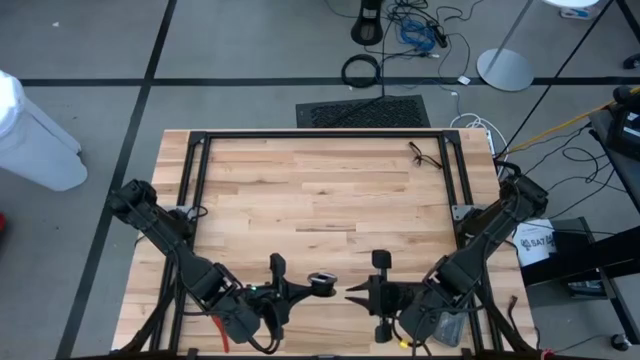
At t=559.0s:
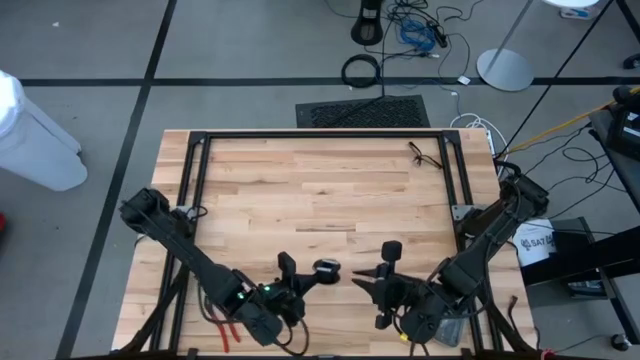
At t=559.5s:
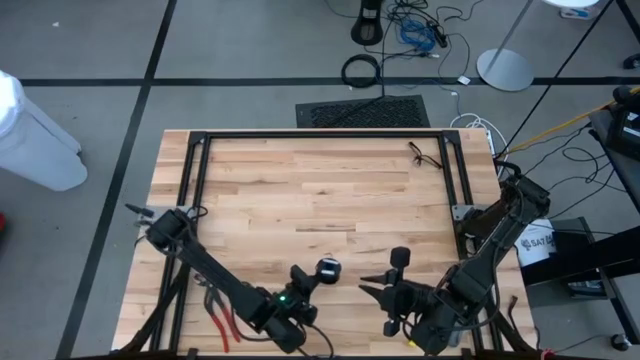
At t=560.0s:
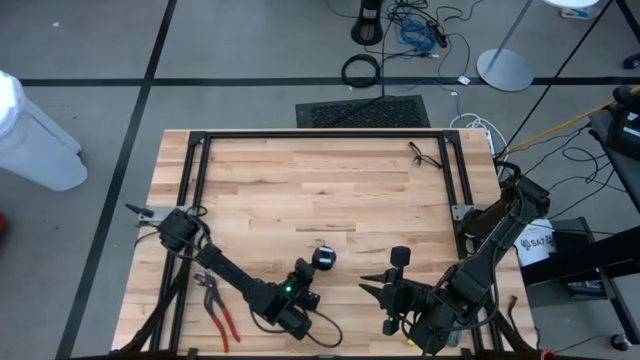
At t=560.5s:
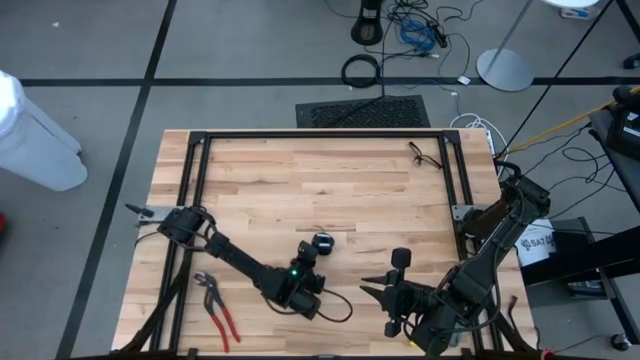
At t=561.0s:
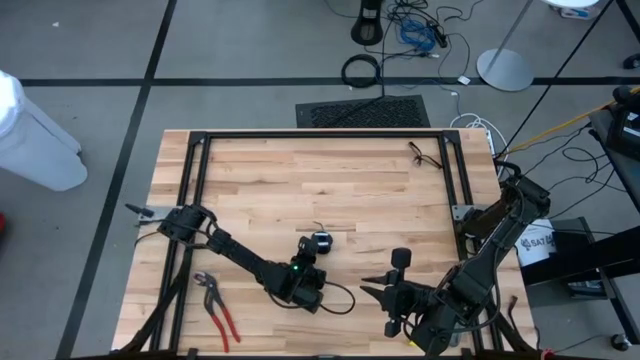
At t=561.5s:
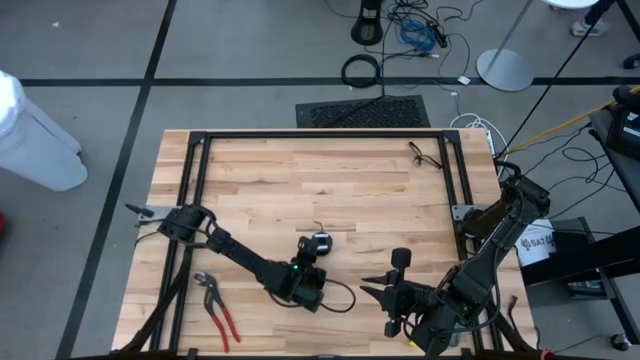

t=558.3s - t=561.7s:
Task: Coil cords
Put the black spool on the table

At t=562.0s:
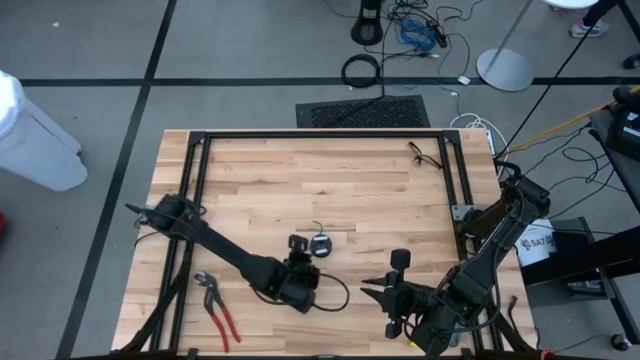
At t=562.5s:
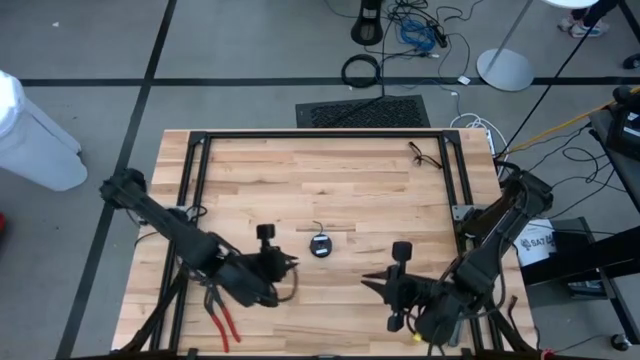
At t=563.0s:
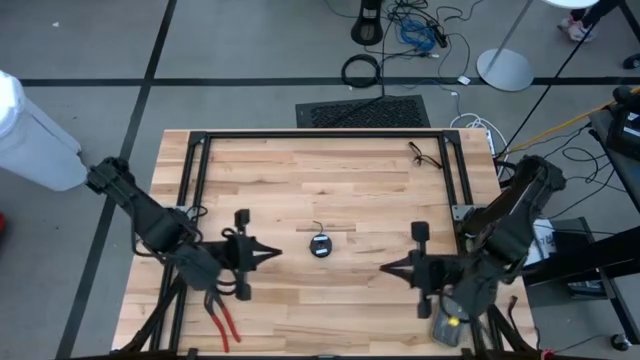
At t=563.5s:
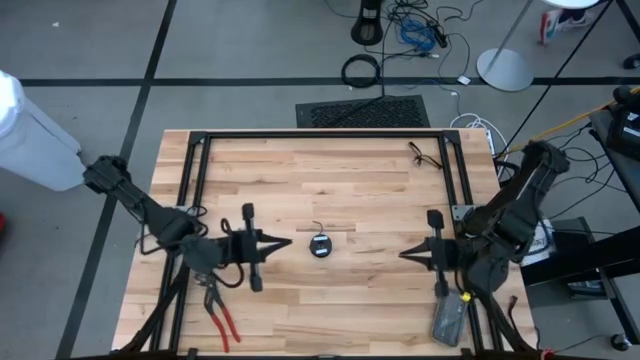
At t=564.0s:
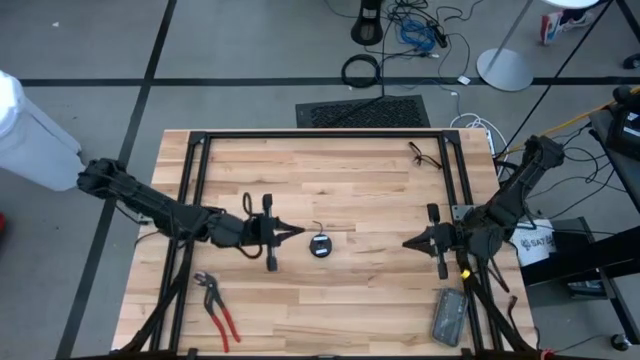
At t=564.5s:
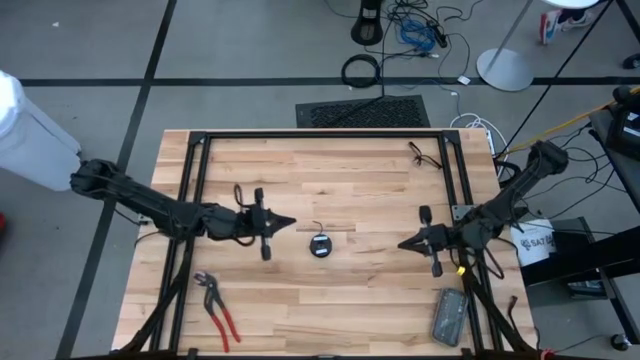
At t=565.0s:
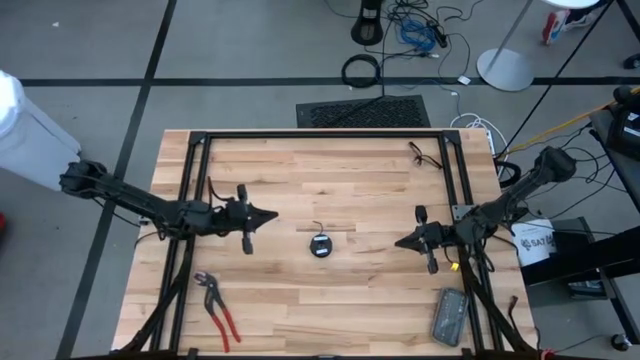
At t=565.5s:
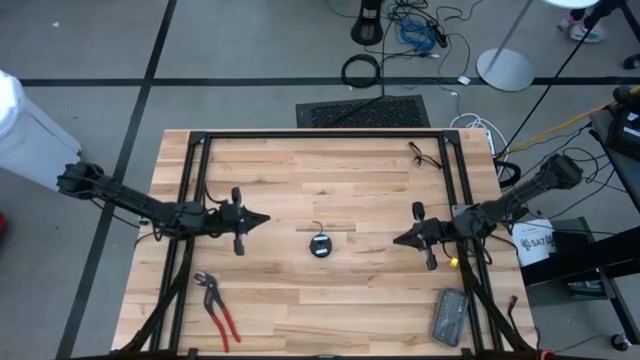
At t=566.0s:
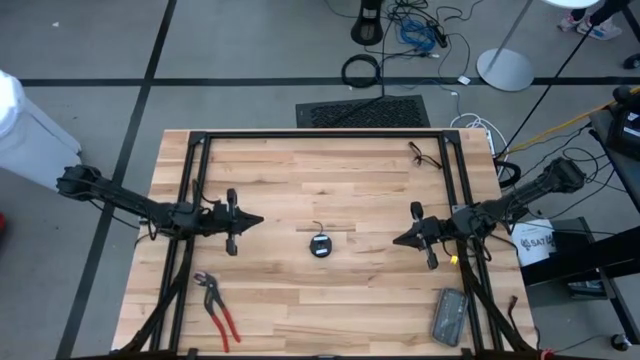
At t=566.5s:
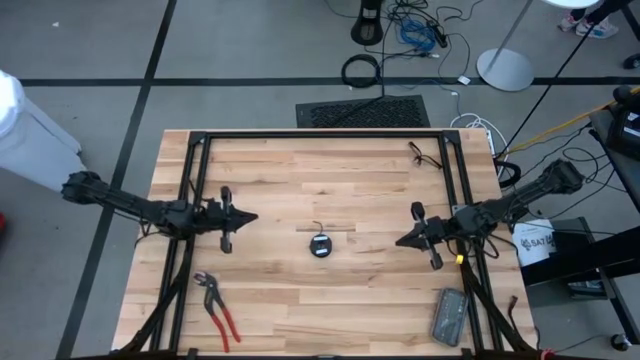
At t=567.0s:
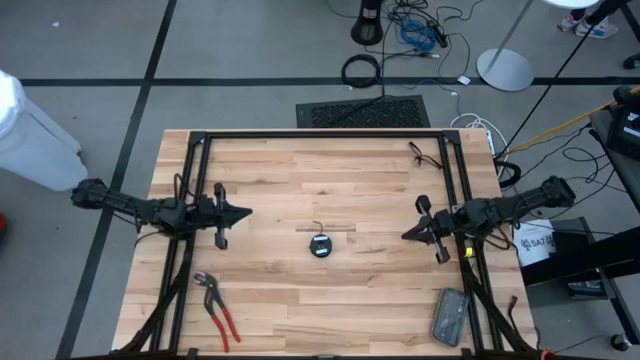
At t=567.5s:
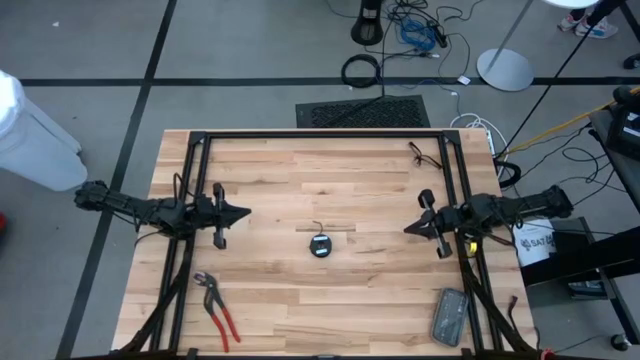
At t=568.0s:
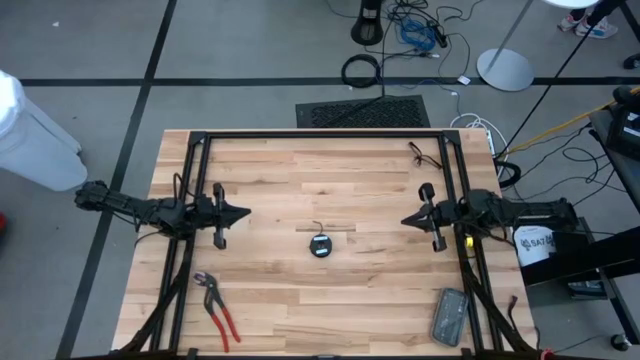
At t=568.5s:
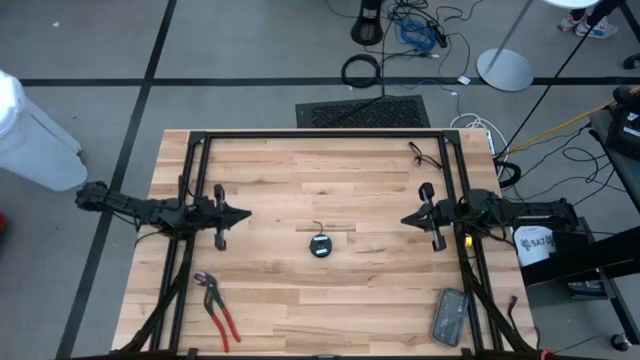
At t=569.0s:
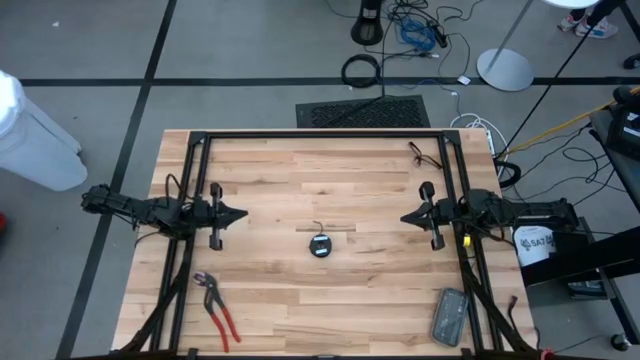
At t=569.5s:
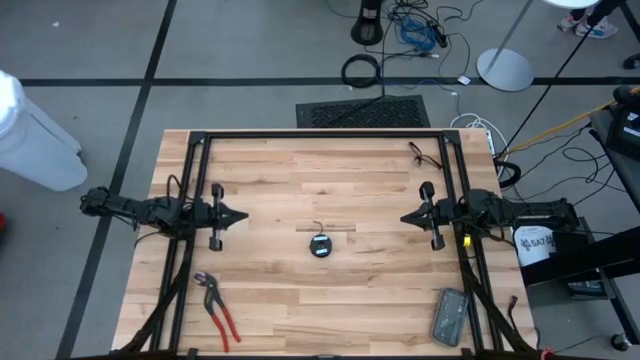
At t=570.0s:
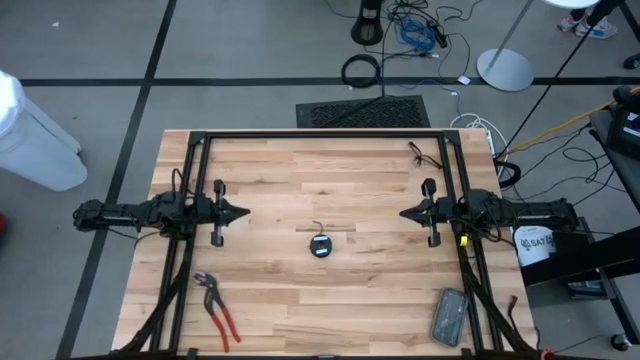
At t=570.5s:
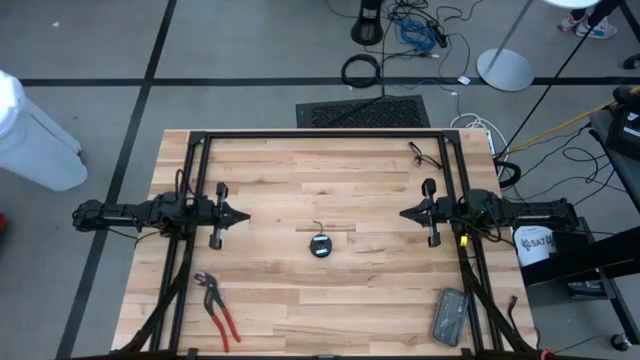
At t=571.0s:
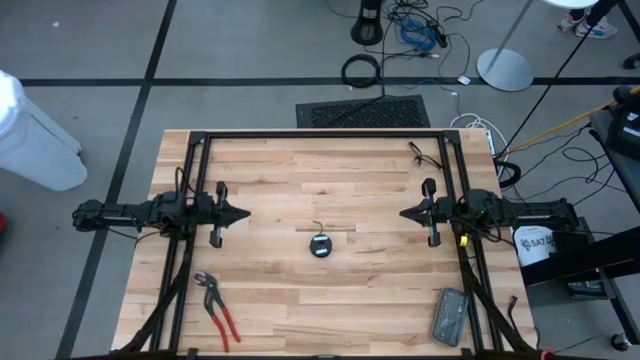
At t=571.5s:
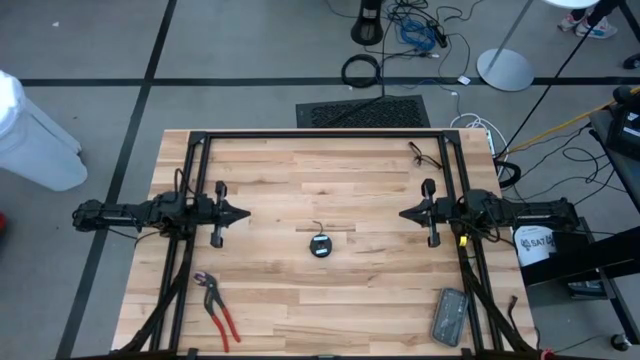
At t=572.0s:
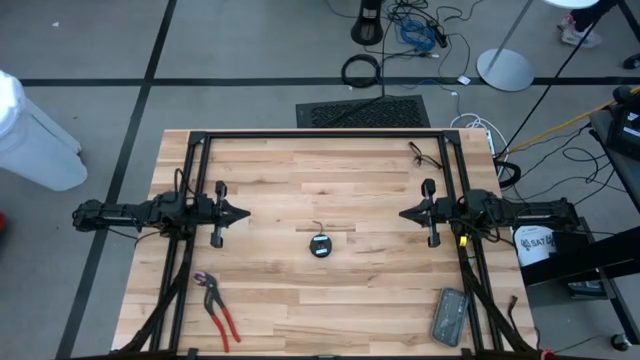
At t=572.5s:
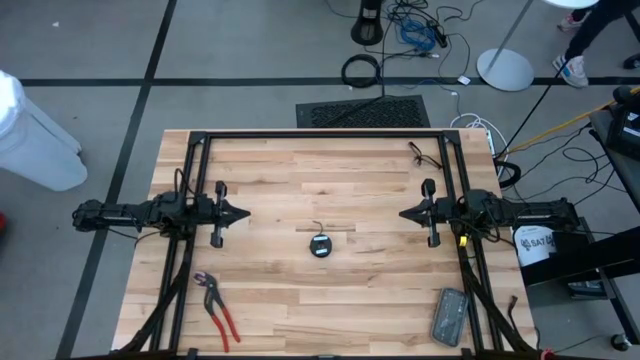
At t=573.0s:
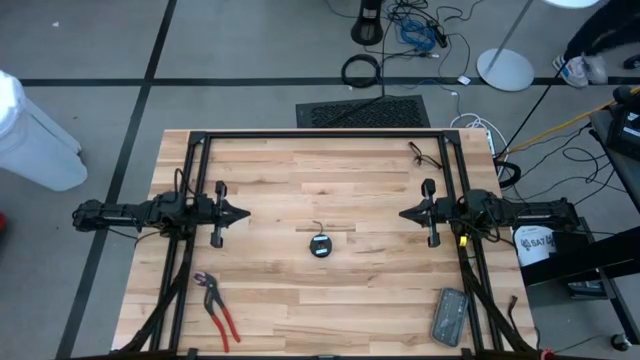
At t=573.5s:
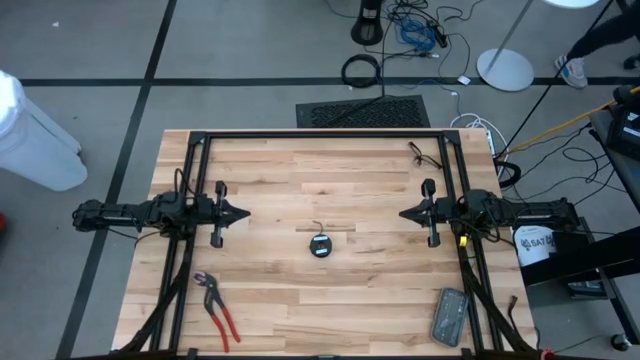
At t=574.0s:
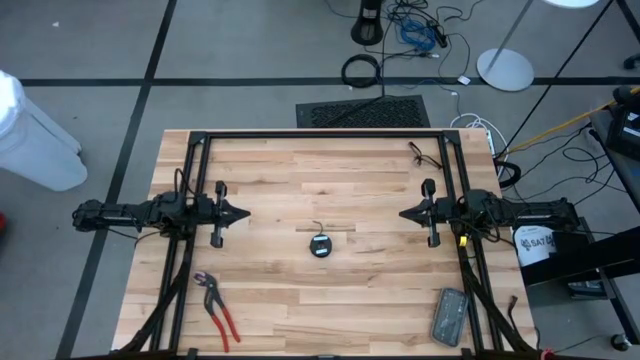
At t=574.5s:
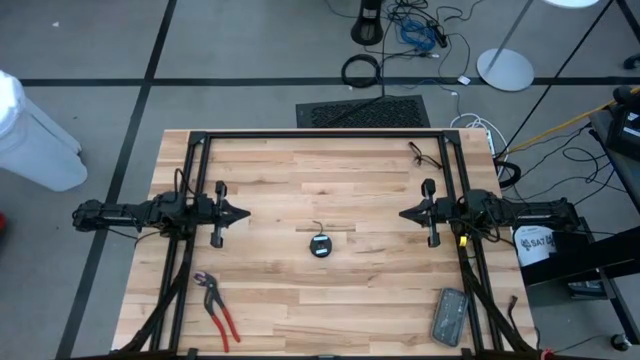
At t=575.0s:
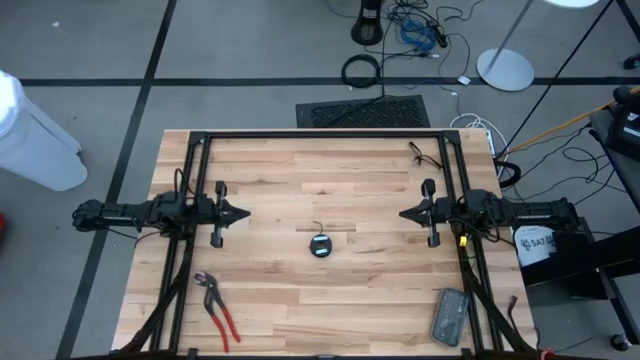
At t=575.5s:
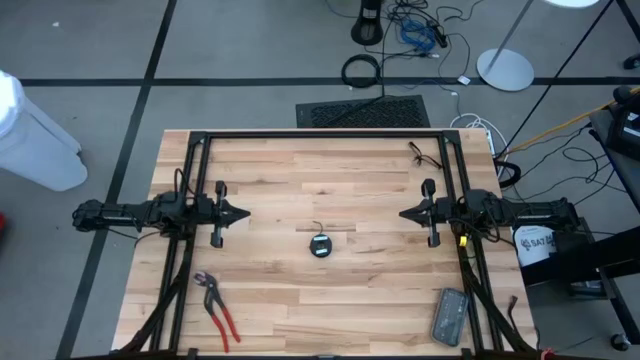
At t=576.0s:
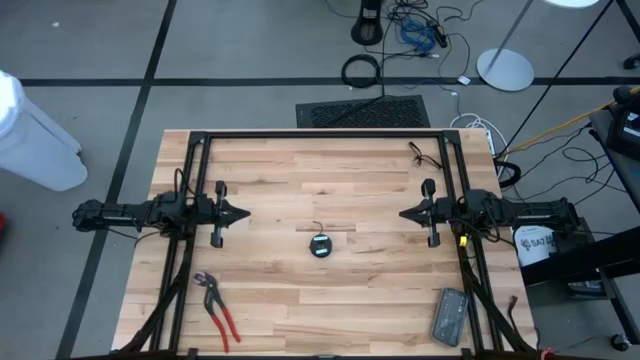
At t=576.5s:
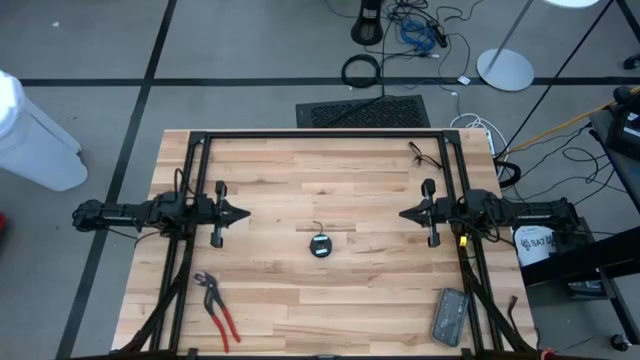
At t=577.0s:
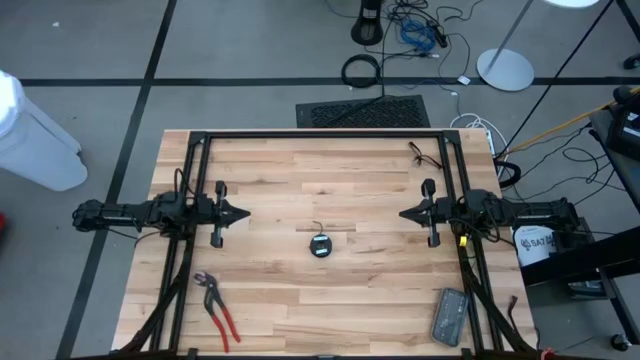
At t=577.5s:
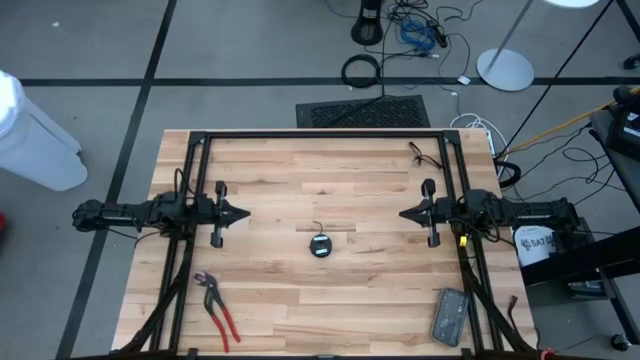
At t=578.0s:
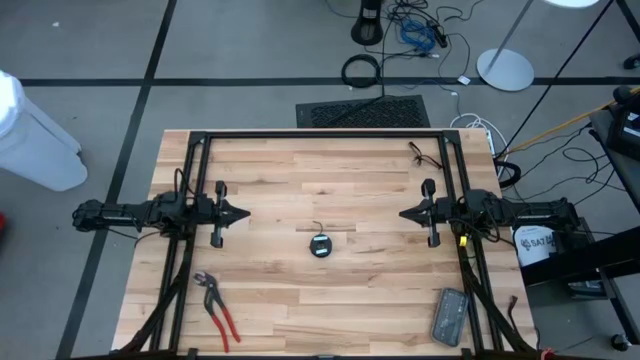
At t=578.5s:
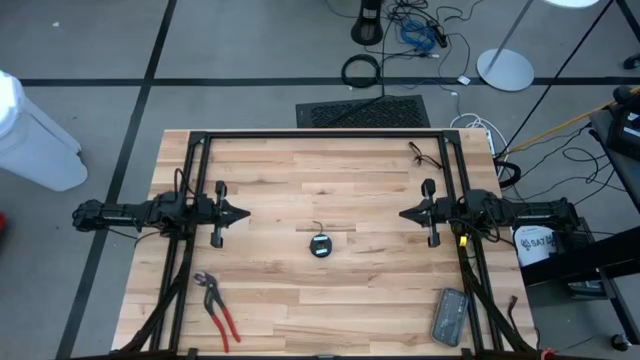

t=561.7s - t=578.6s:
Return to Home Position

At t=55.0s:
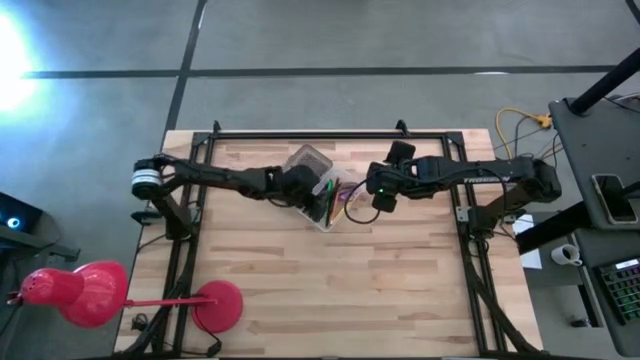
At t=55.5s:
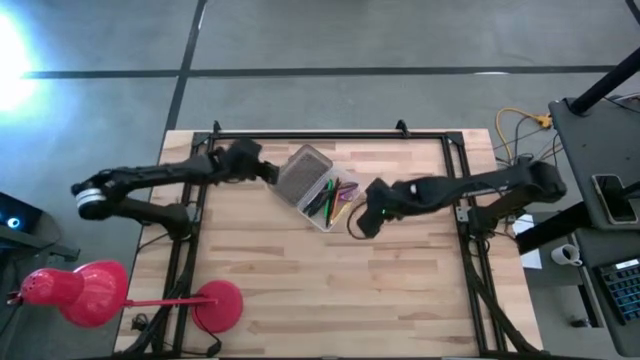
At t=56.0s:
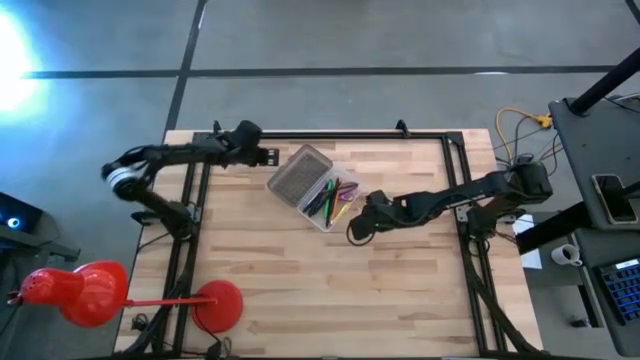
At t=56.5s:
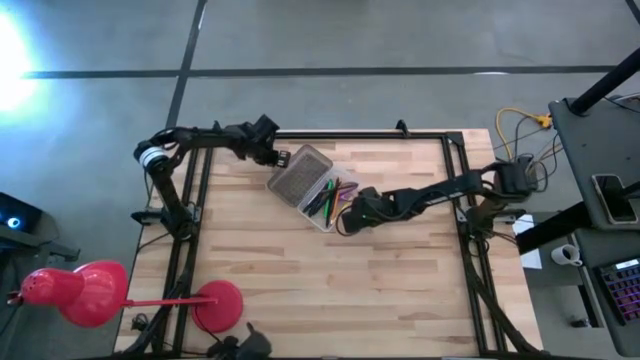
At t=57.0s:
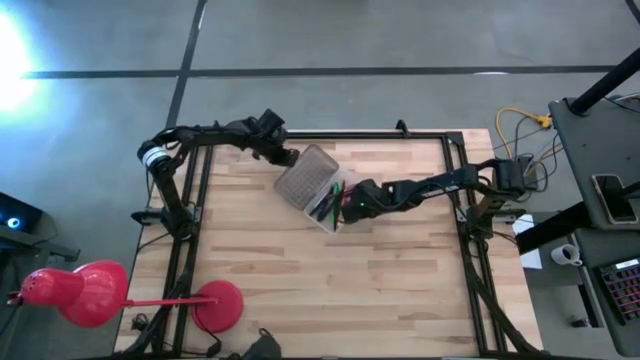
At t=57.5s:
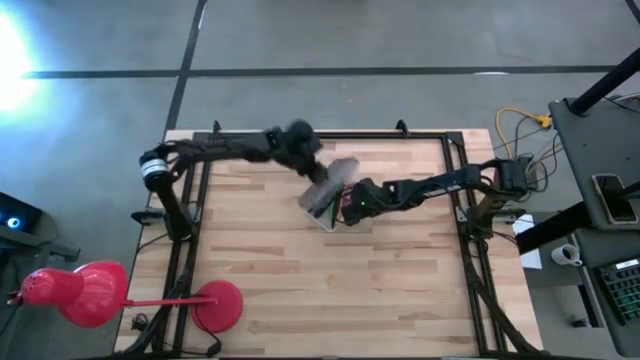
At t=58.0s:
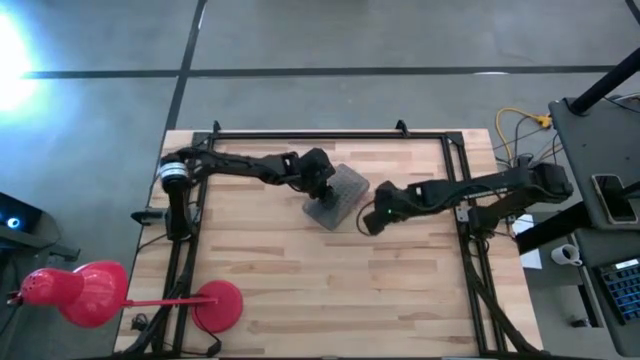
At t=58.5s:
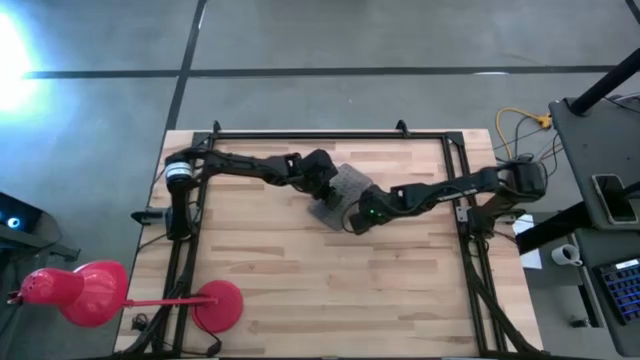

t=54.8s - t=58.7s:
Task: Pick & place school supplies into a supply box
Close the supply box
